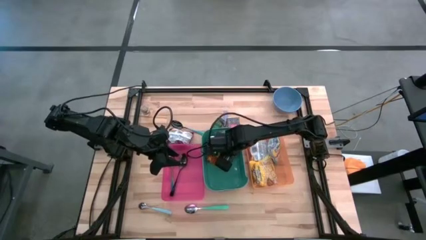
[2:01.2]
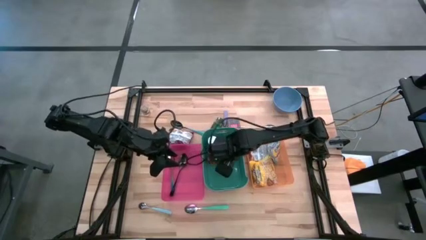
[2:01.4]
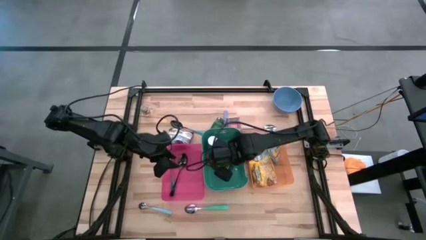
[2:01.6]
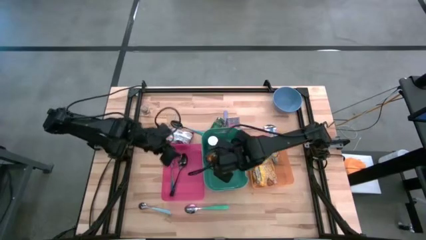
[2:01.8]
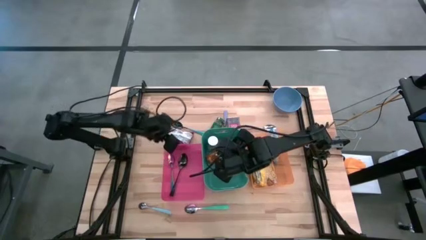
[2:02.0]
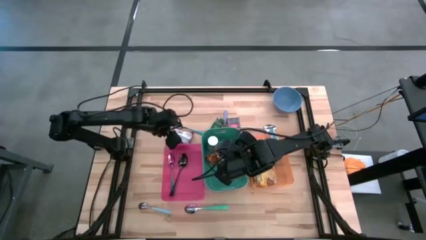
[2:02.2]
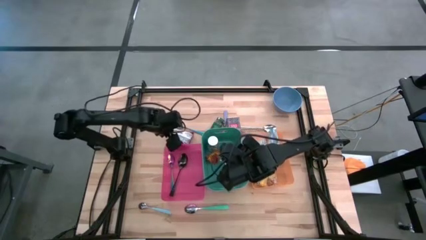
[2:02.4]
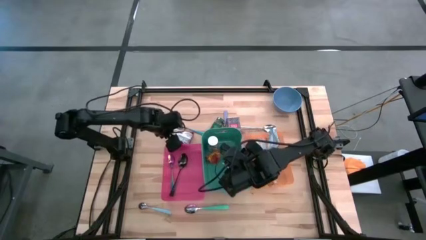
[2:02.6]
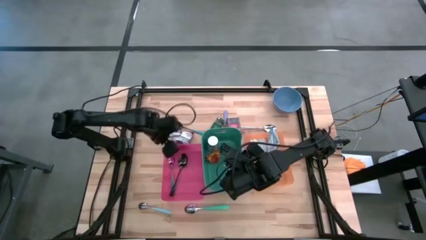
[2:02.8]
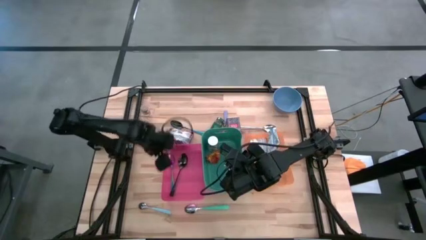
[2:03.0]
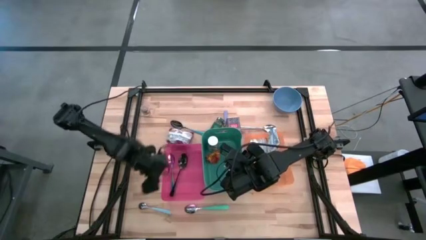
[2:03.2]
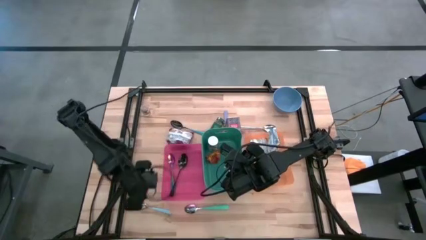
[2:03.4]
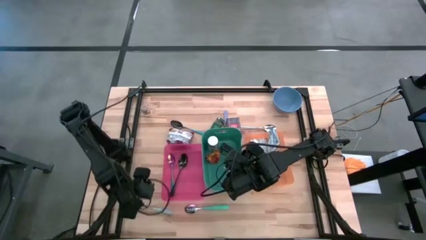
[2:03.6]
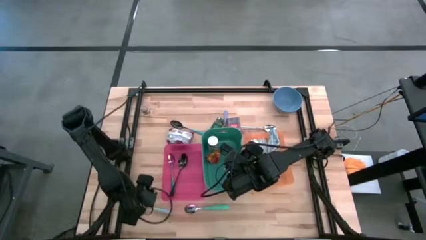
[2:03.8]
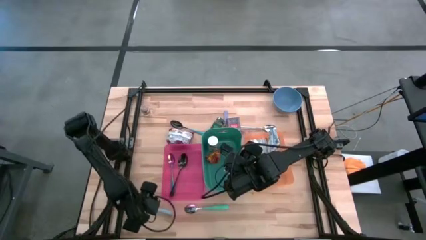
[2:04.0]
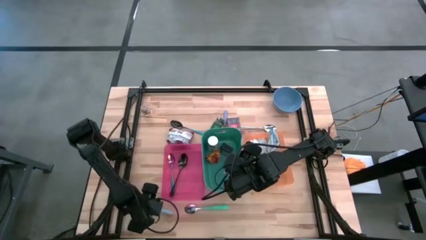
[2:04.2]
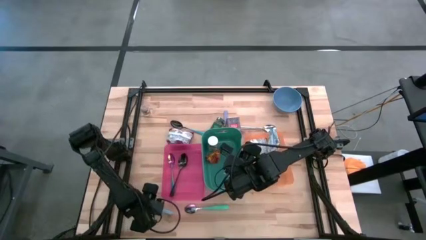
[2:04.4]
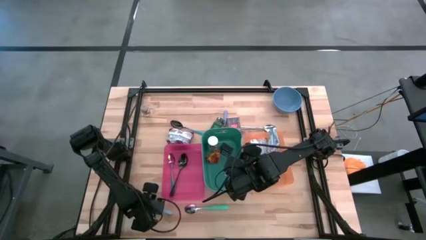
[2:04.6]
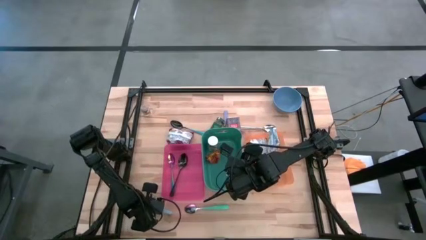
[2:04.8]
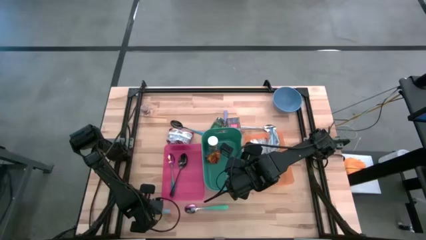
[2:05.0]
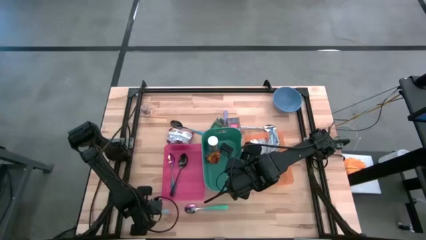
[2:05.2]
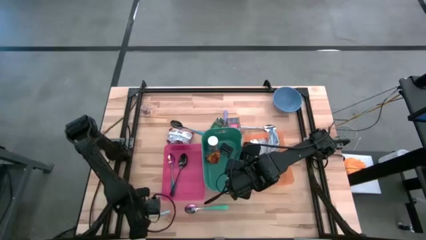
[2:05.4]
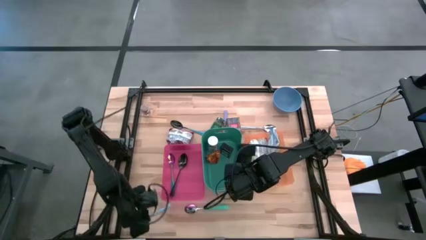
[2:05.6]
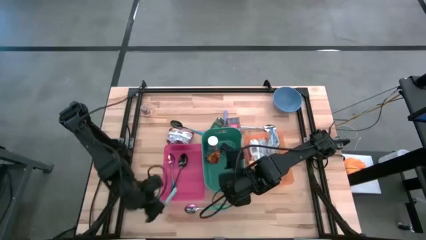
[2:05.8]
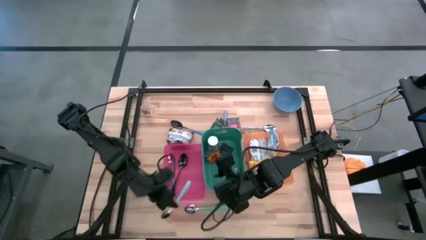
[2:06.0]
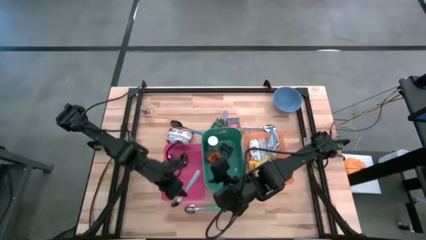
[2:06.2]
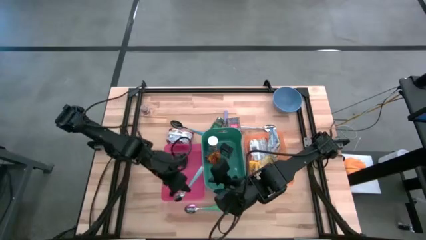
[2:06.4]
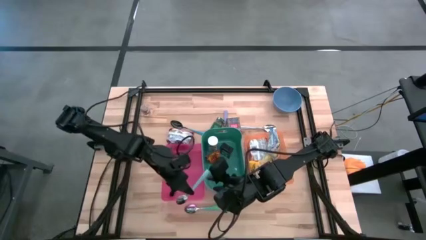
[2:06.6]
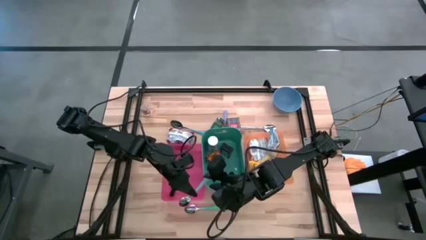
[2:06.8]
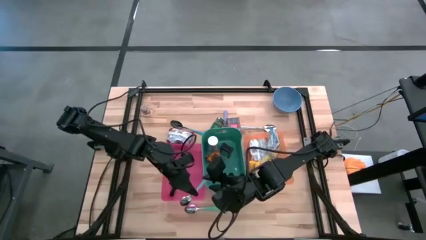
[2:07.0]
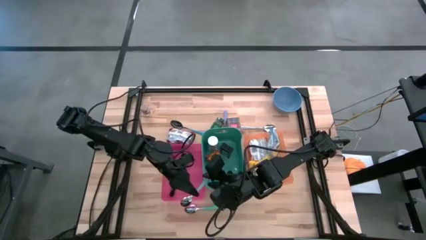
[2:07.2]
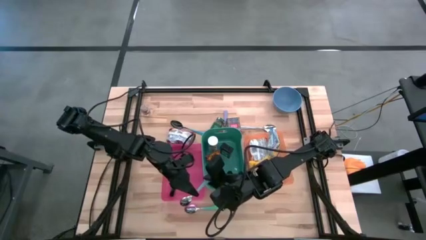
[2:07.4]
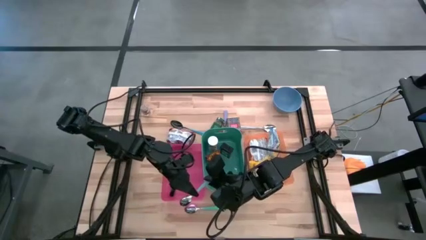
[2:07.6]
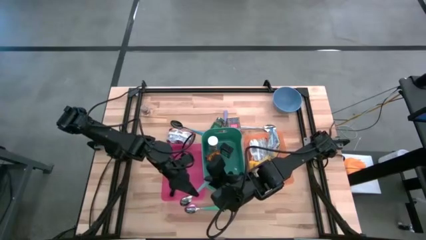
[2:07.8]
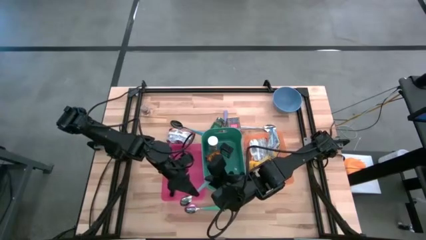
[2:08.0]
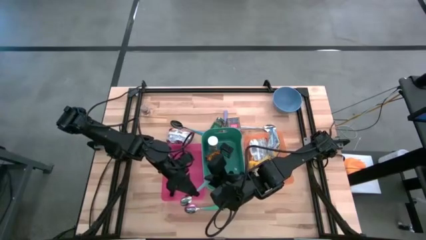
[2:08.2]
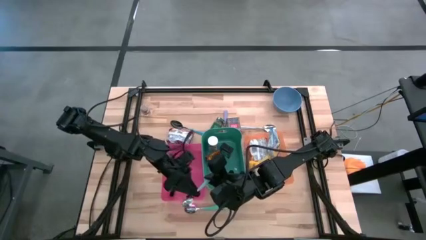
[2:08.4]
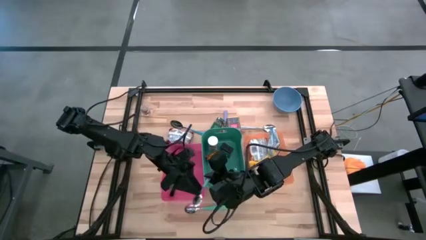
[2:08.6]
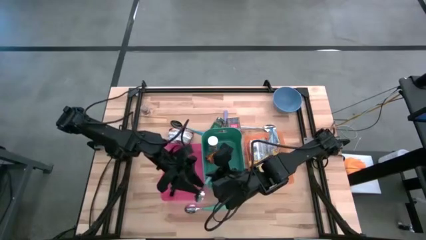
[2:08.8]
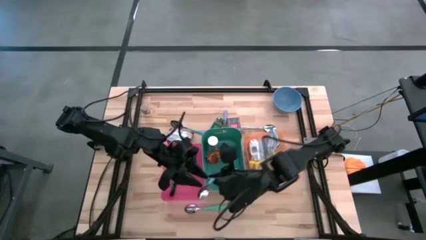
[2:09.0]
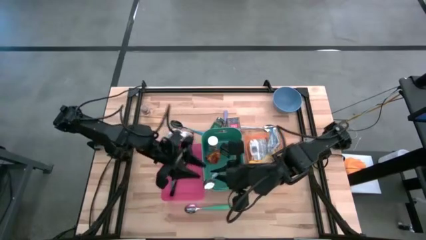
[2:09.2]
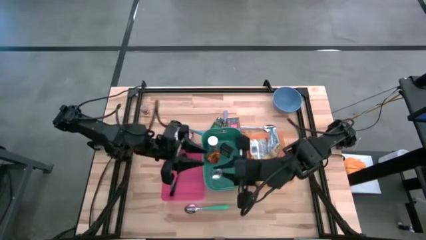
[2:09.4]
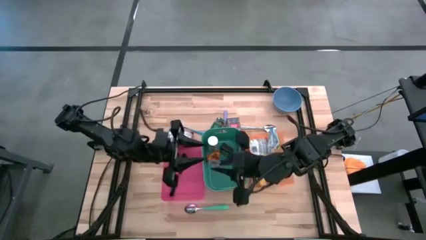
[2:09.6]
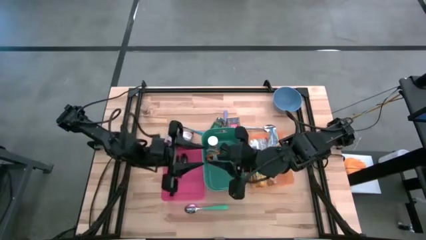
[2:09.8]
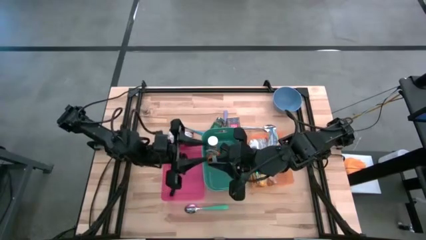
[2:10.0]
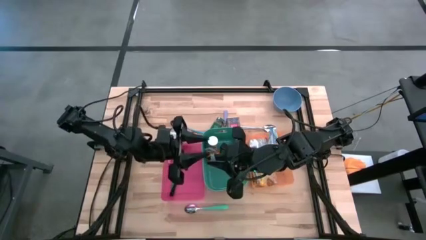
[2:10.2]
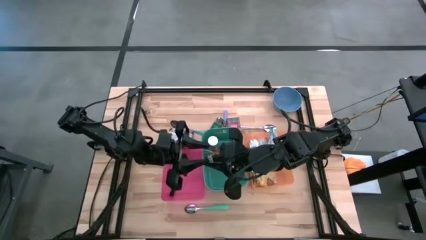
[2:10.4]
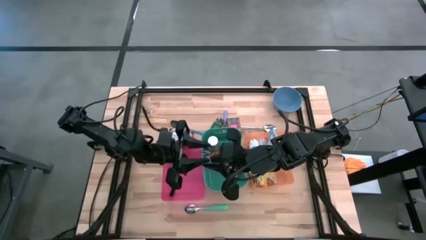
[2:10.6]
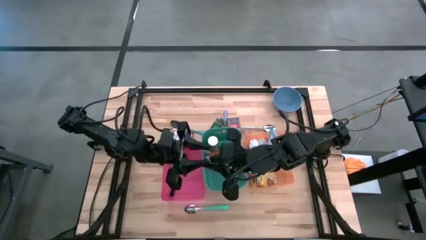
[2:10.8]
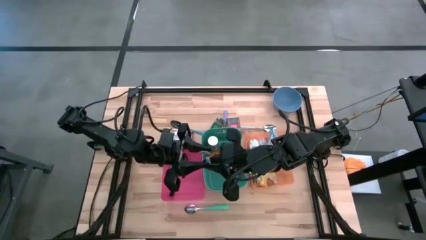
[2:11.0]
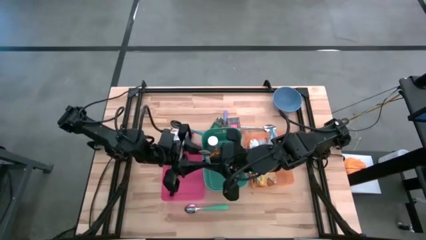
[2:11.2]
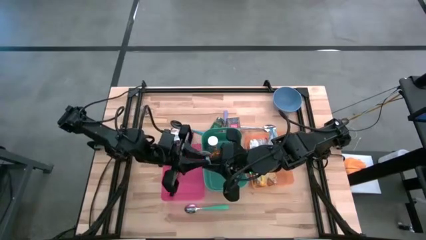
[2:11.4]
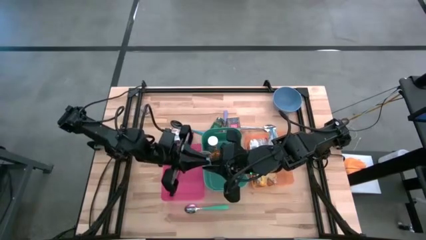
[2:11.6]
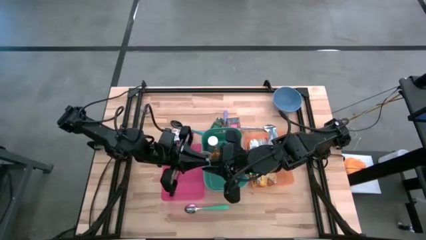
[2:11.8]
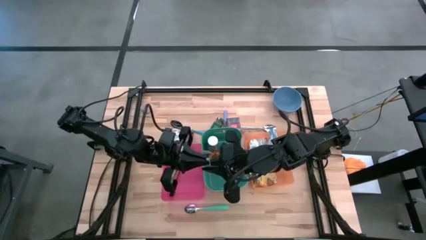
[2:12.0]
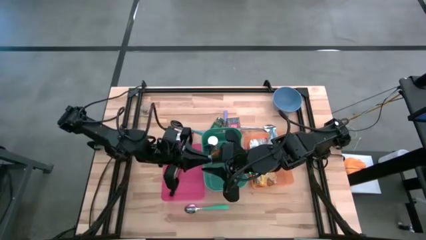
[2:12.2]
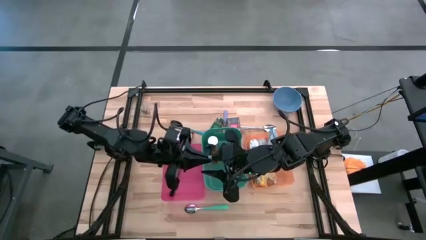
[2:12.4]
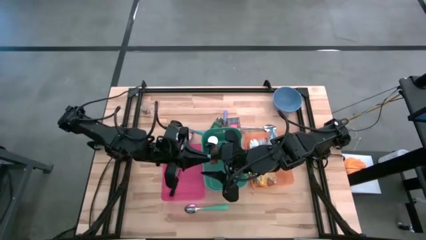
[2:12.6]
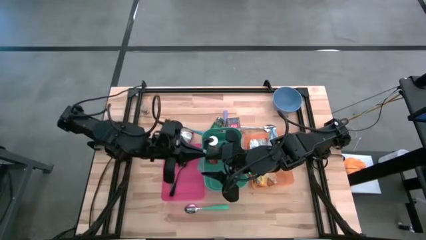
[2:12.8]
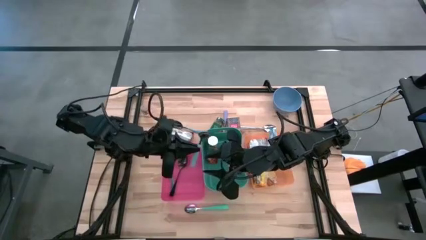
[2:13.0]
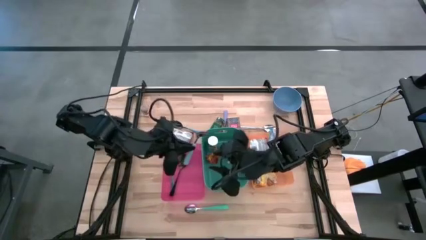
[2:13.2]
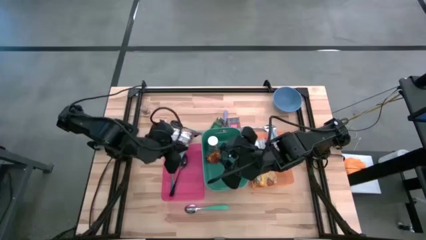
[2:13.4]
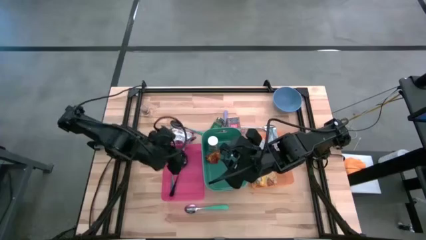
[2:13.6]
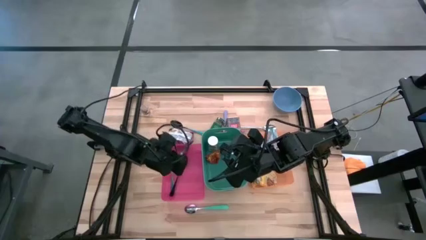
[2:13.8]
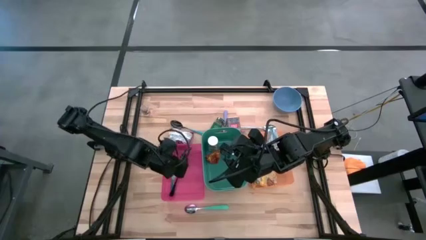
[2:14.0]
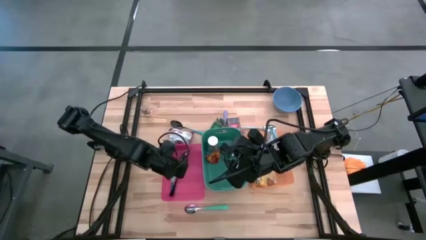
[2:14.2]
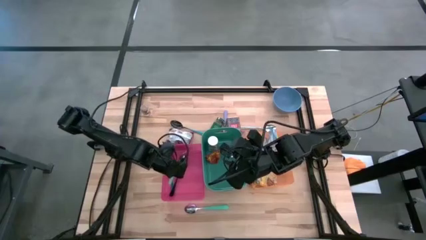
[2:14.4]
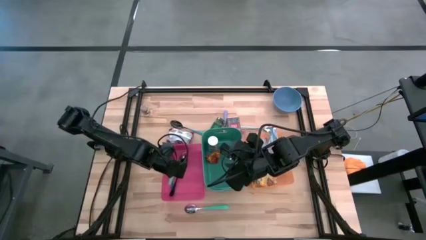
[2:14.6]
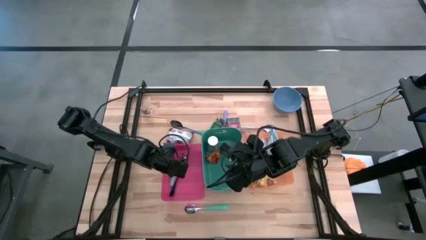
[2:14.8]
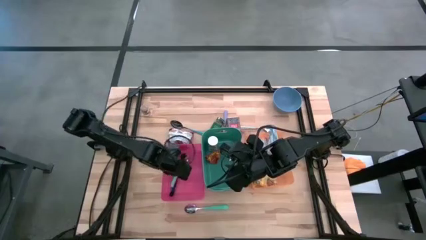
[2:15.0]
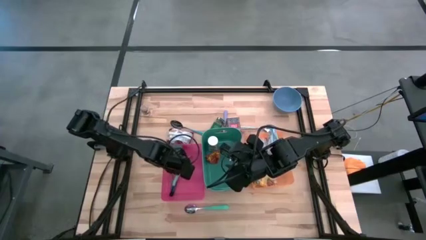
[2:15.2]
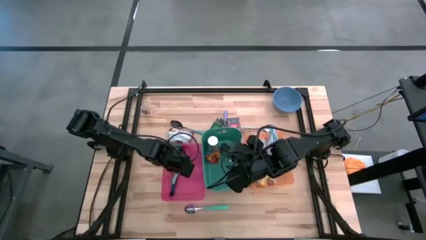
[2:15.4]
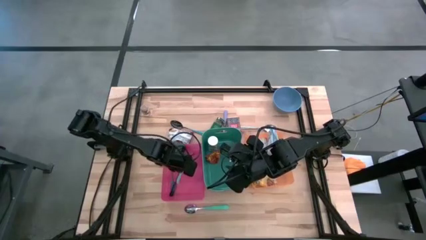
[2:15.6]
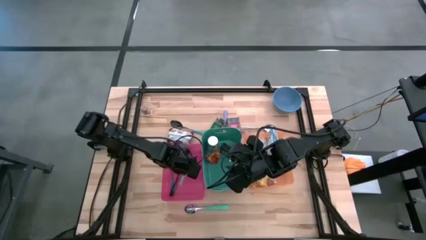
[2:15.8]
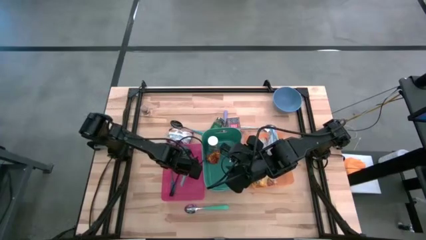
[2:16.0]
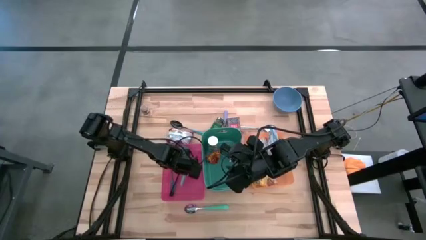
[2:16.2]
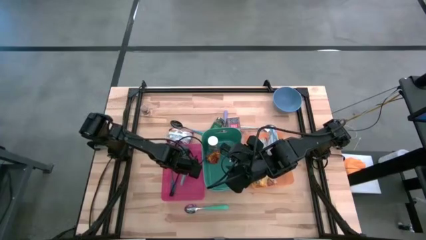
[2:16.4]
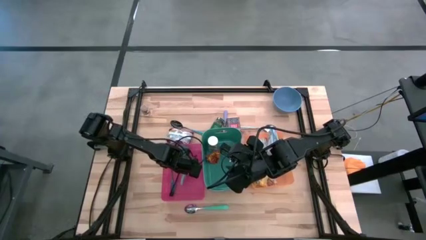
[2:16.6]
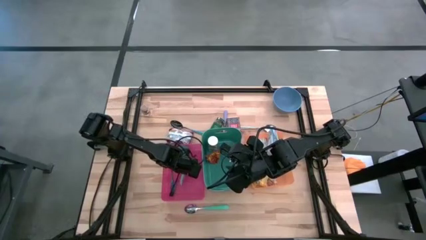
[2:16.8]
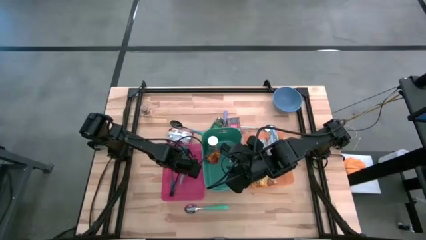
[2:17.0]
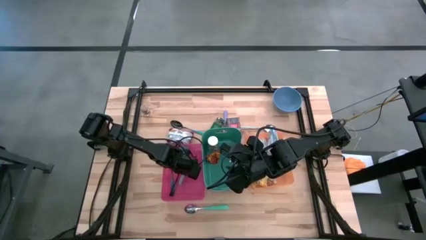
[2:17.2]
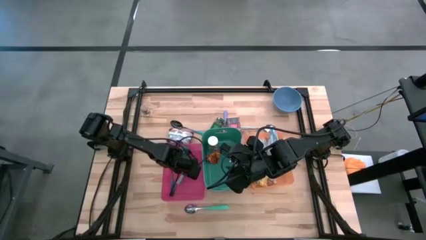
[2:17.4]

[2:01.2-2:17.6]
Put the blue spoon into the pink bin
